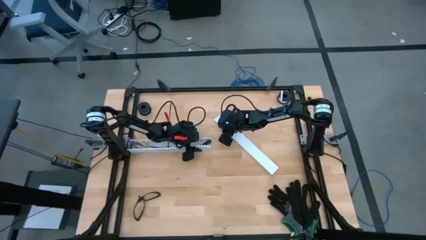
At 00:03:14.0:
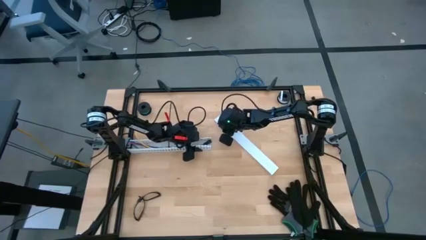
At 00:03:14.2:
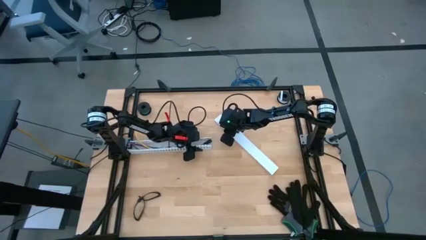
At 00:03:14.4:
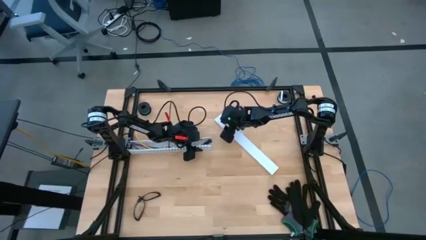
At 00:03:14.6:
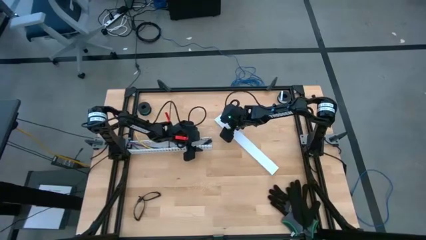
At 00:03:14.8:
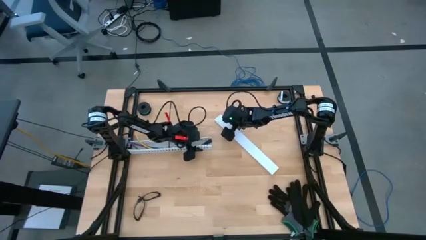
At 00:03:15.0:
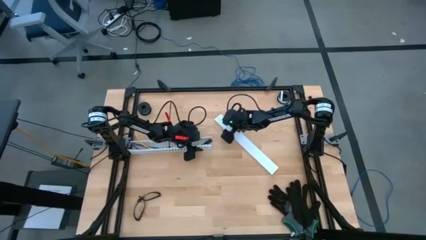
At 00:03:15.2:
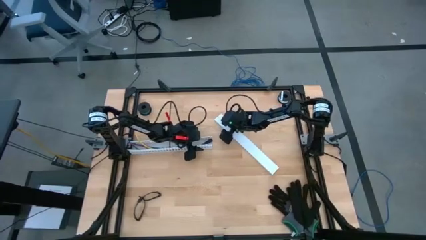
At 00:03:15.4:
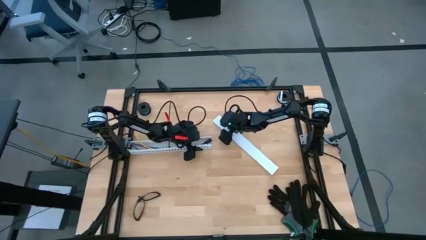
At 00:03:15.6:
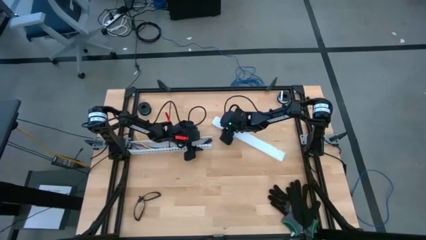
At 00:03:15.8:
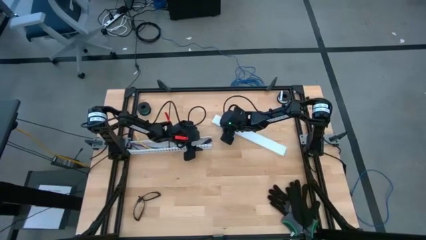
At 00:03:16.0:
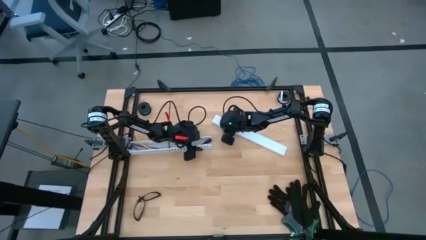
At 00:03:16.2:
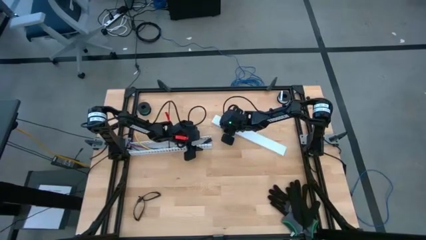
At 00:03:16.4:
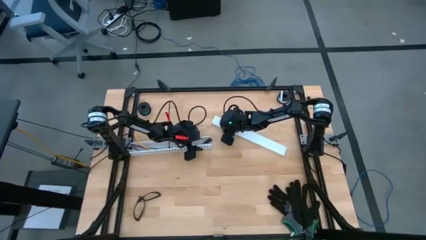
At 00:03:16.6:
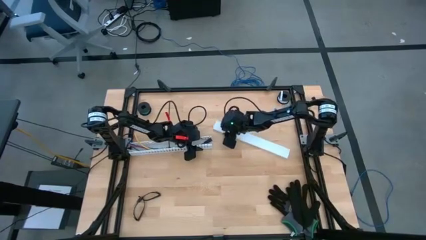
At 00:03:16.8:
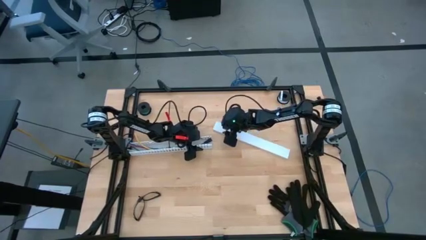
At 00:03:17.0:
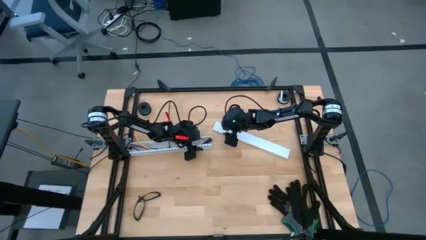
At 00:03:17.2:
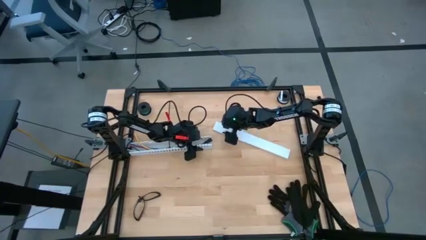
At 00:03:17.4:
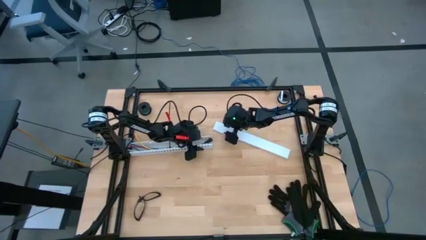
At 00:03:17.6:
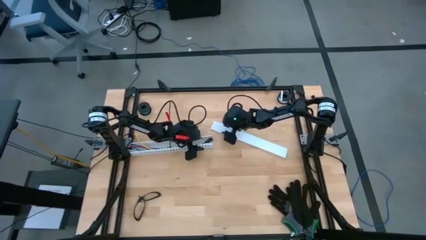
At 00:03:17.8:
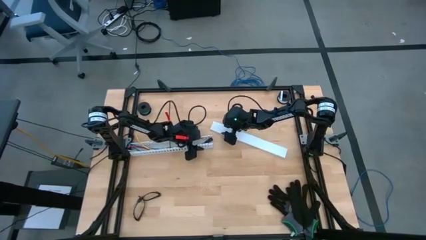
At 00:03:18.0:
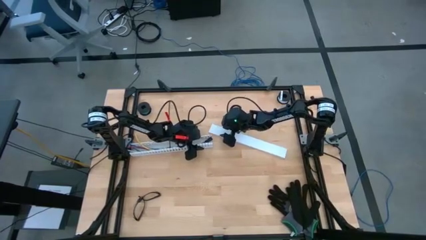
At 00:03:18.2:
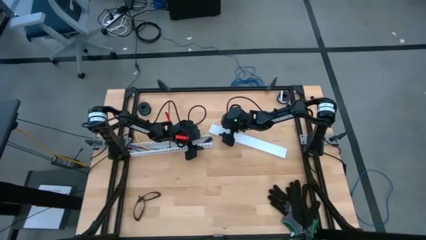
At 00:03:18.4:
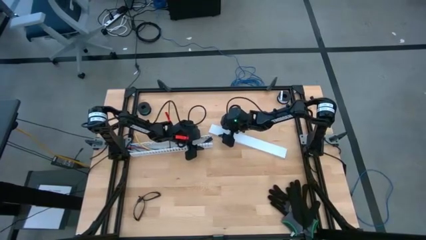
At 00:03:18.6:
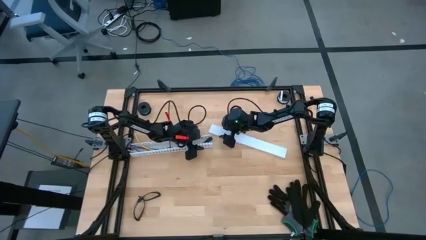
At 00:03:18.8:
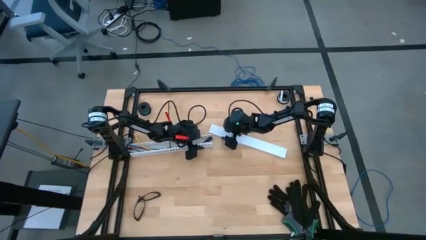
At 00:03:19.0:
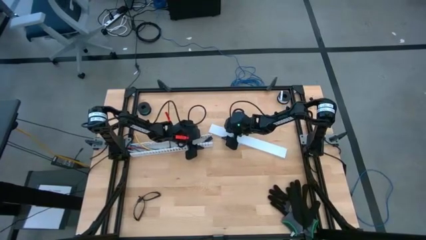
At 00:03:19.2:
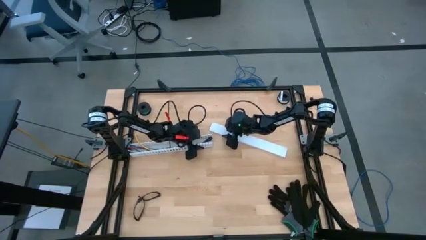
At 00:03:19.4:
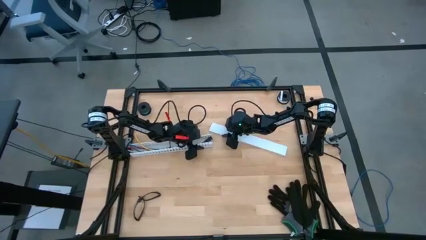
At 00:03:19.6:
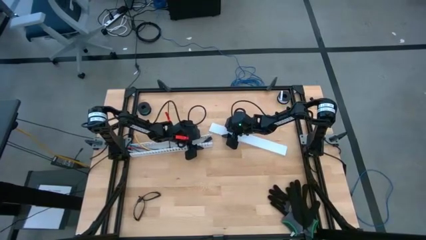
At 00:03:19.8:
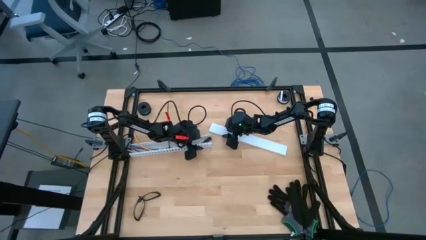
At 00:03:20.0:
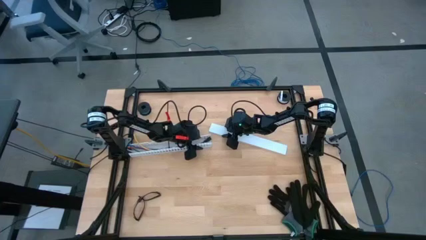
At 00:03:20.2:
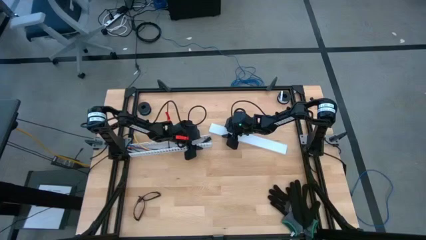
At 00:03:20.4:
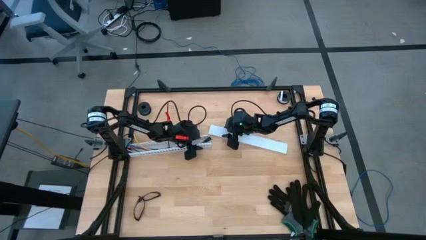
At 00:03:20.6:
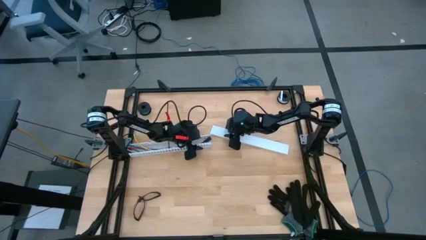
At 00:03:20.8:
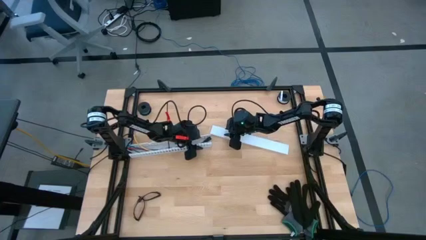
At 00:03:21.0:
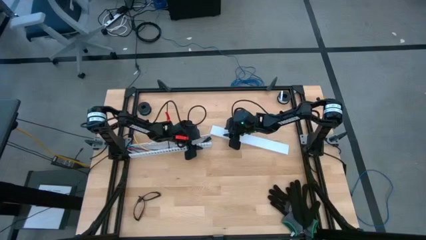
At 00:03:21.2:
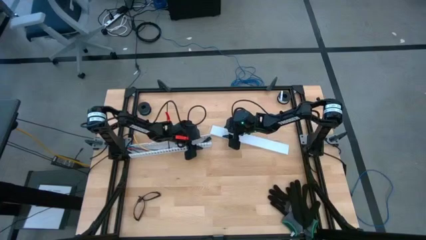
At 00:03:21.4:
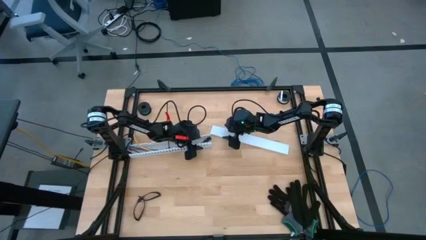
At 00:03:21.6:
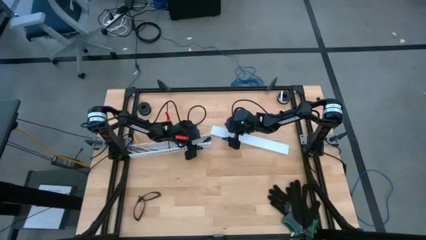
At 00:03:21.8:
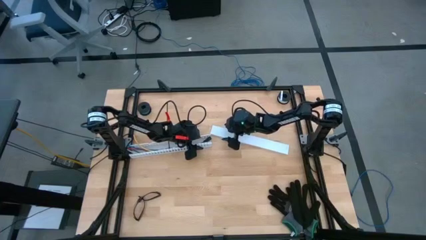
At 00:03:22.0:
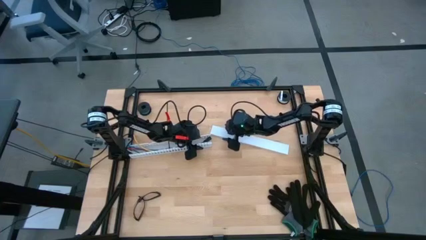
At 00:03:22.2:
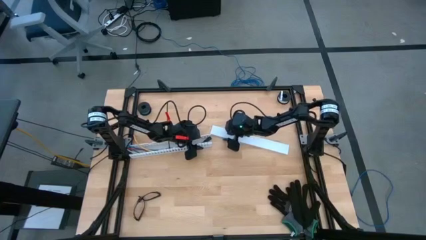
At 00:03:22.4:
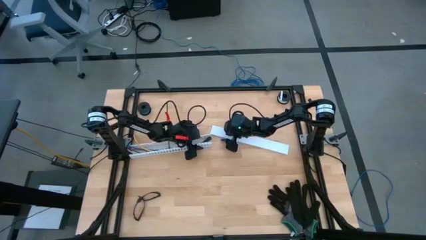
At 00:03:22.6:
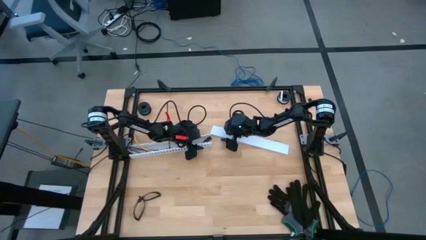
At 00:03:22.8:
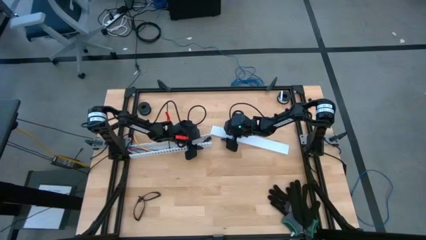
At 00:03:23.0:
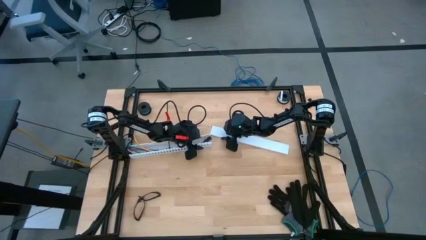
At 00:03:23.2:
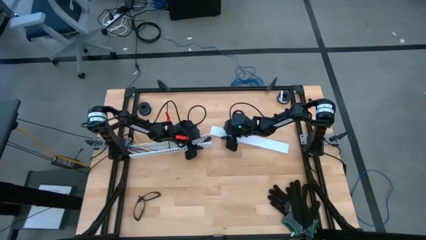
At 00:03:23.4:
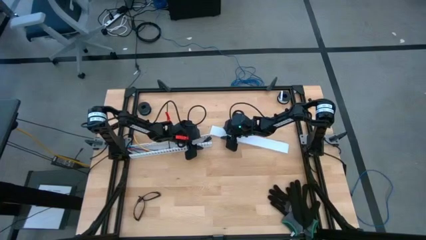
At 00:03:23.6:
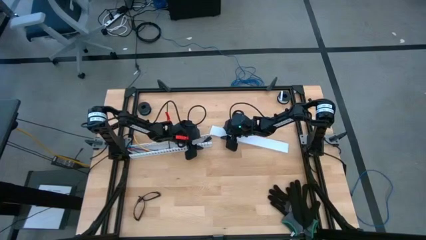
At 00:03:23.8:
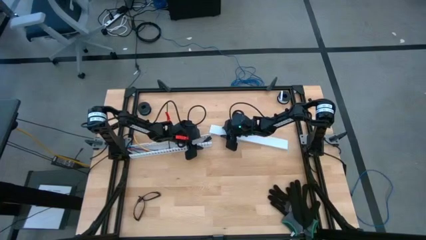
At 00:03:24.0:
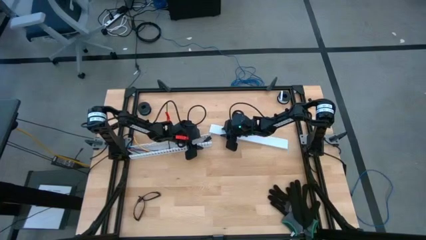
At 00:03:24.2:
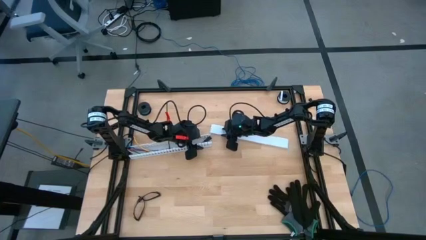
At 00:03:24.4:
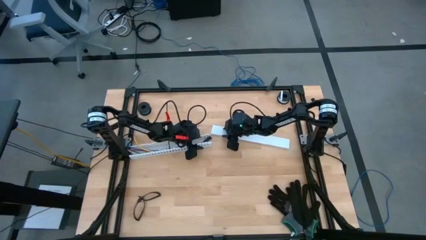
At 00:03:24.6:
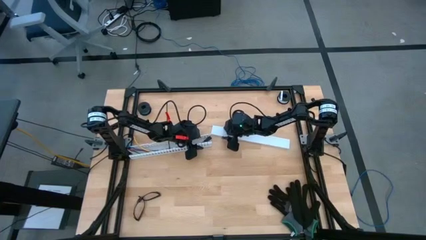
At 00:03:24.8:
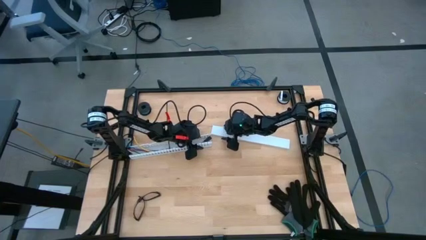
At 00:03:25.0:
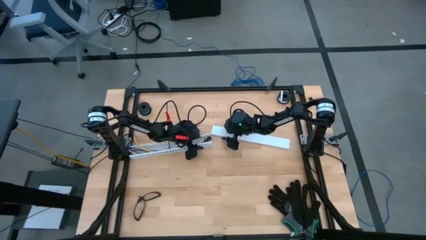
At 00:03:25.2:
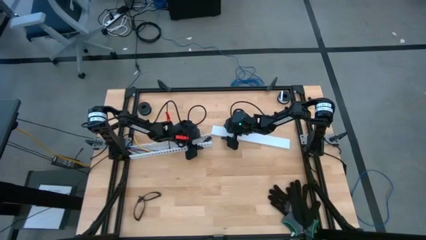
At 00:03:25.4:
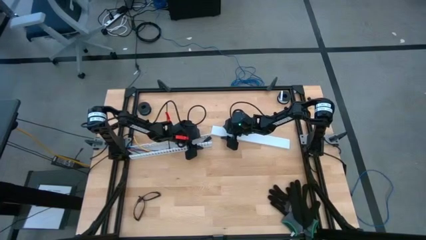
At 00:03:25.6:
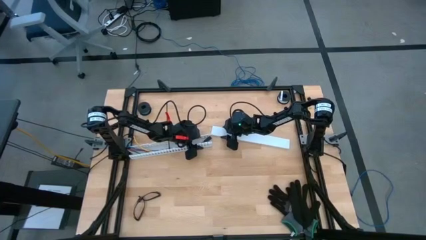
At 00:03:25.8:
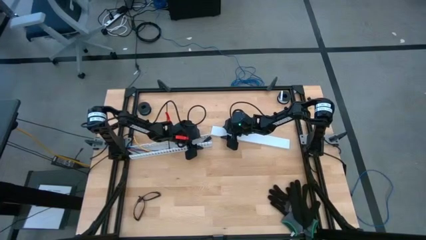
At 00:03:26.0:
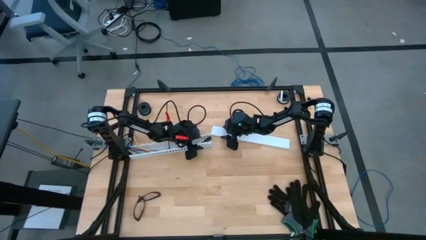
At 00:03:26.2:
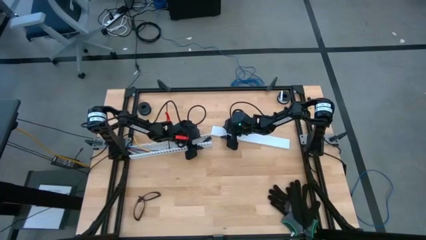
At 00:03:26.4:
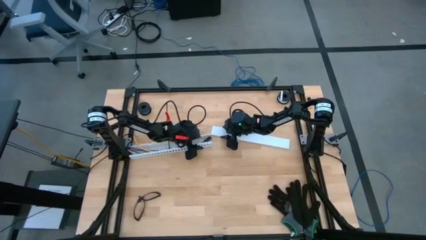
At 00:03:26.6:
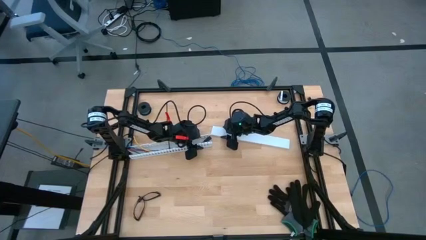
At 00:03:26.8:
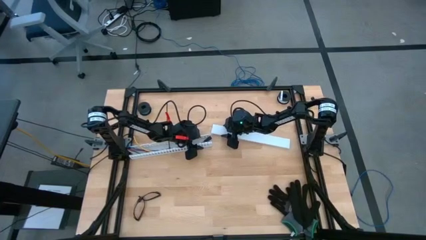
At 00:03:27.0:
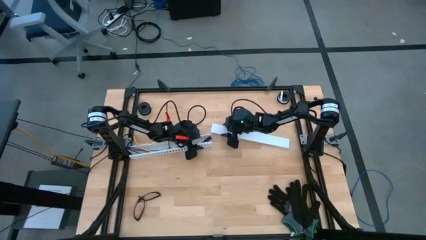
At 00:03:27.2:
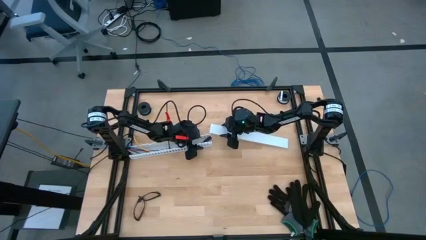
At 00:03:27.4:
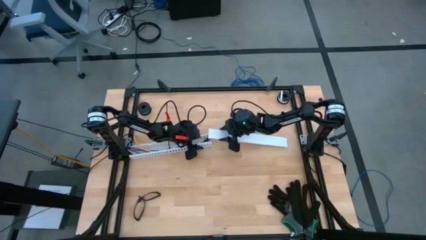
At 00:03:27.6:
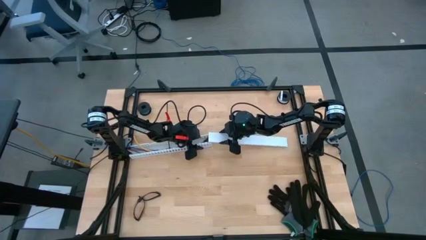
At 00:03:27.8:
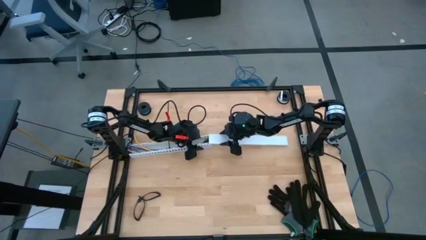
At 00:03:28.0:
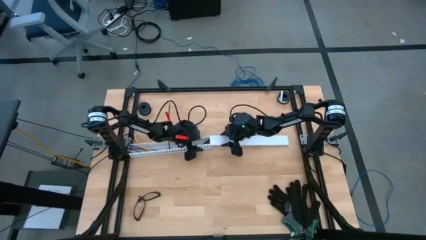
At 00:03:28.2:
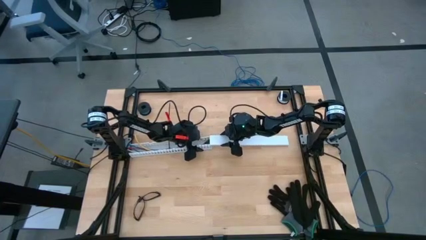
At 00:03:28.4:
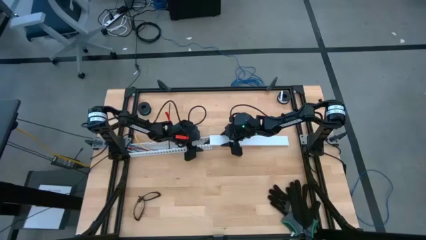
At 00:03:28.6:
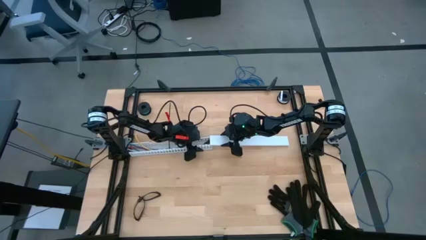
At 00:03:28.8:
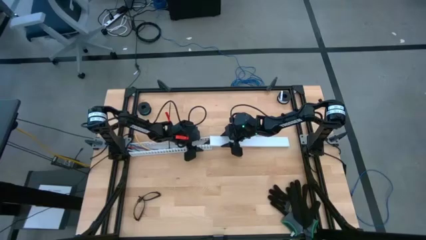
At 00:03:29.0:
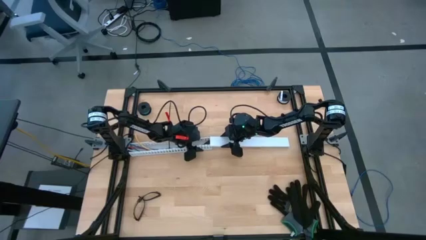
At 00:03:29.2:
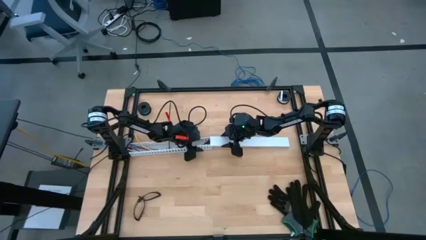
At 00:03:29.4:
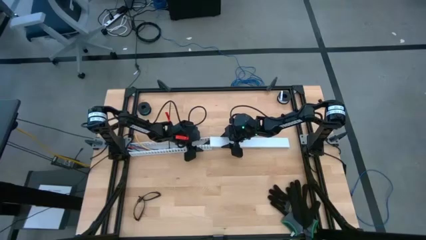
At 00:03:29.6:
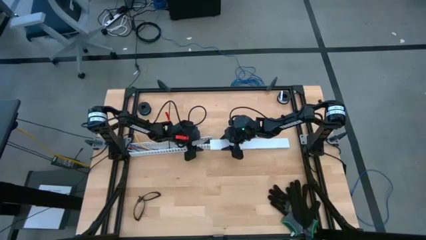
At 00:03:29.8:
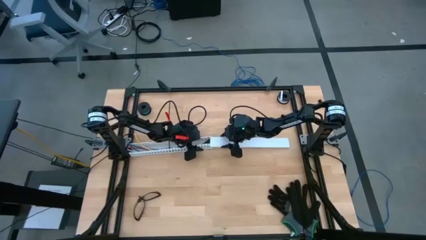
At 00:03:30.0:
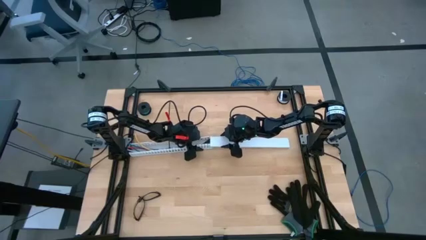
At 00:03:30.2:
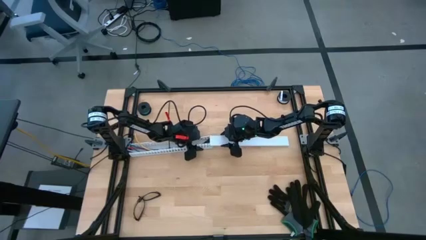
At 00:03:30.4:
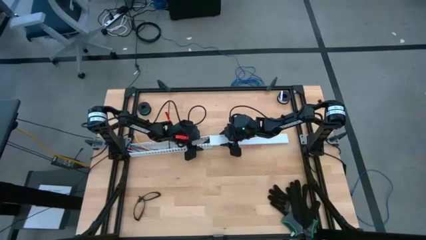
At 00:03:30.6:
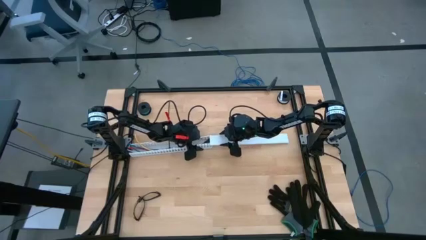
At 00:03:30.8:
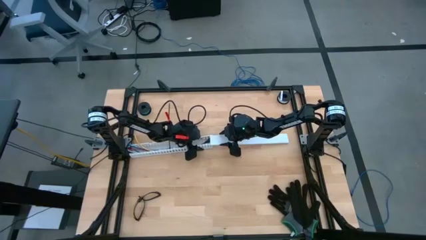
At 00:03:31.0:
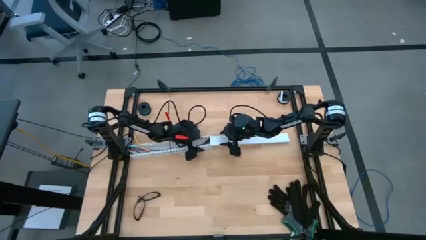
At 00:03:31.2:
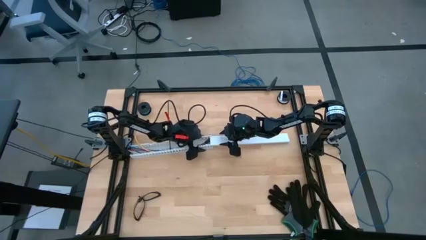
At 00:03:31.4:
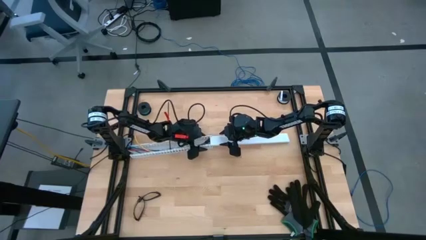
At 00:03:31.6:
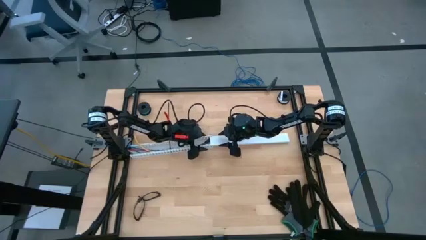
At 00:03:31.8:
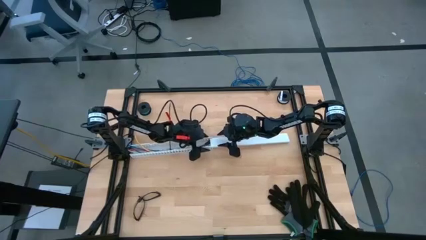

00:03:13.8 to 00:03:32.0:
Task: Ziptie cables
Close the white cable duct using the cover
